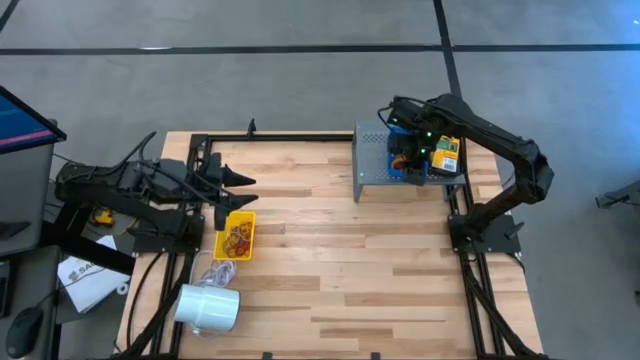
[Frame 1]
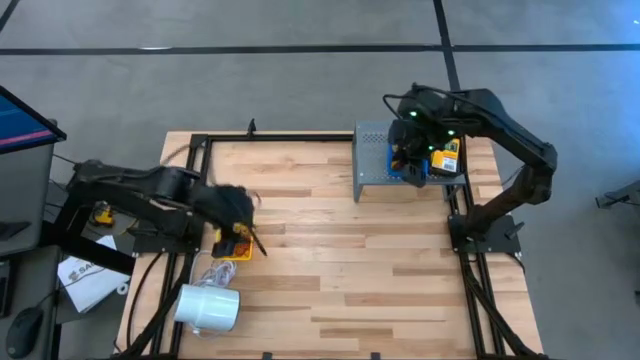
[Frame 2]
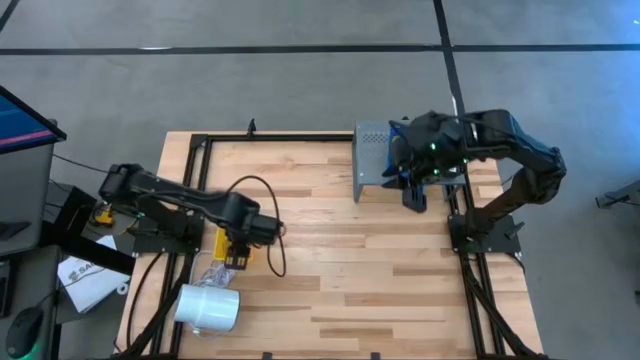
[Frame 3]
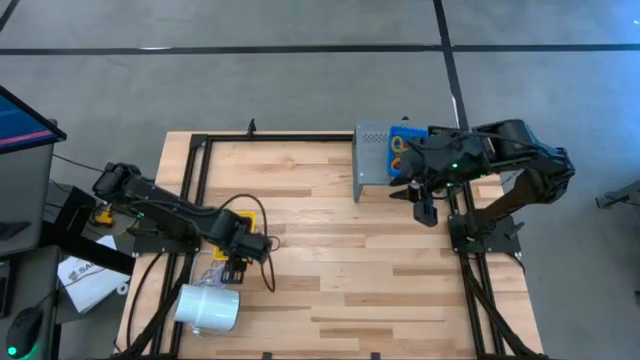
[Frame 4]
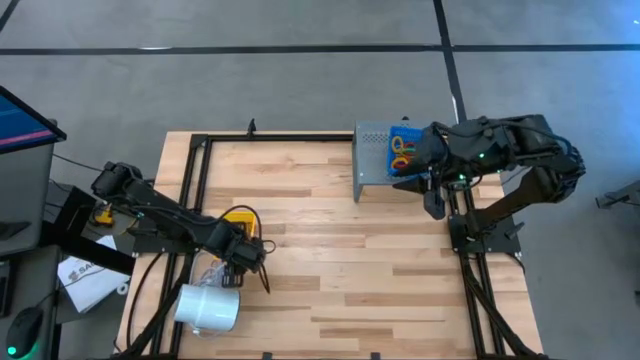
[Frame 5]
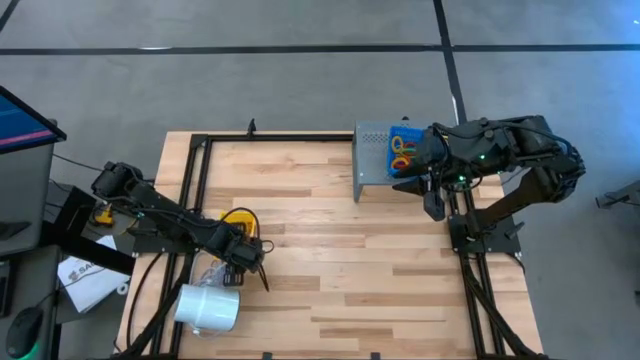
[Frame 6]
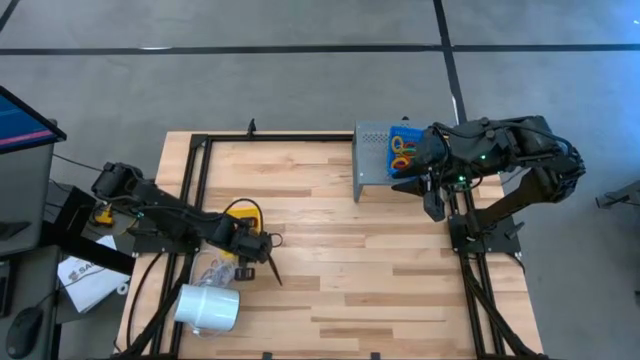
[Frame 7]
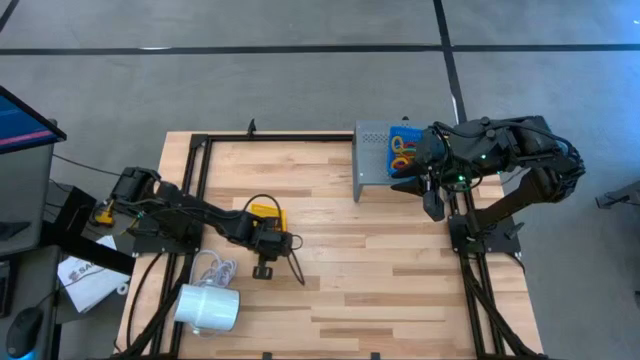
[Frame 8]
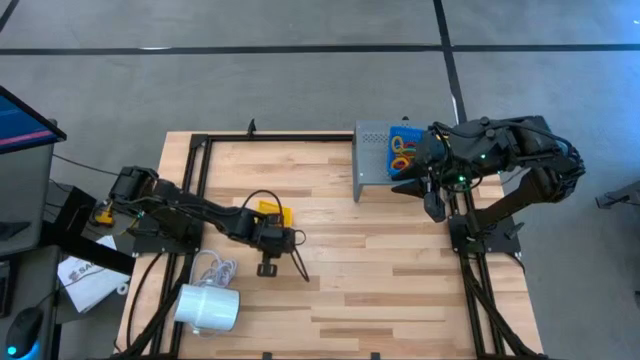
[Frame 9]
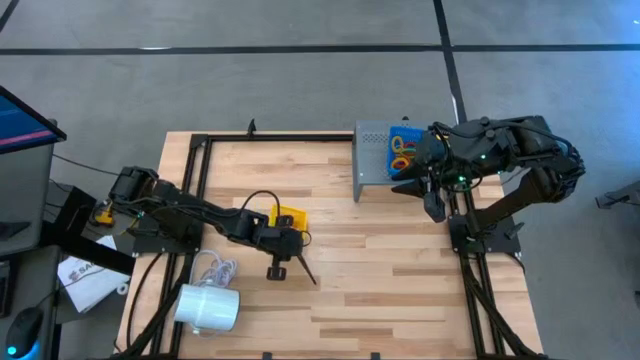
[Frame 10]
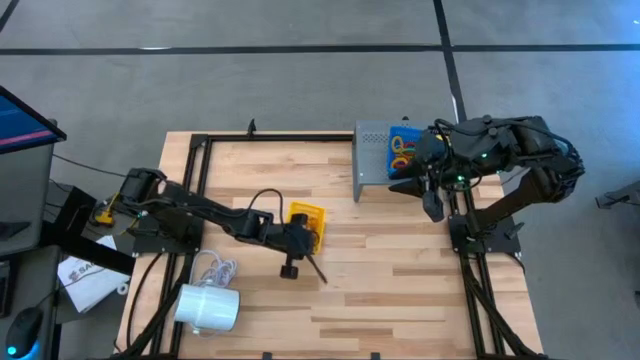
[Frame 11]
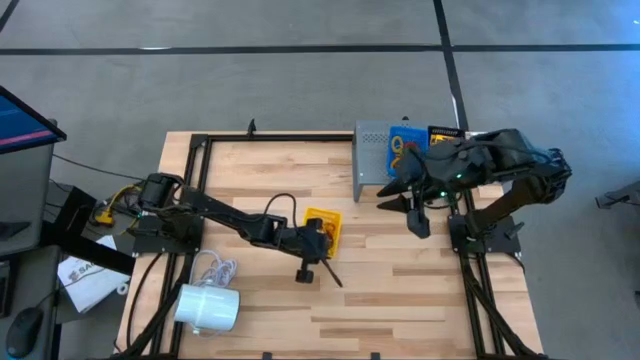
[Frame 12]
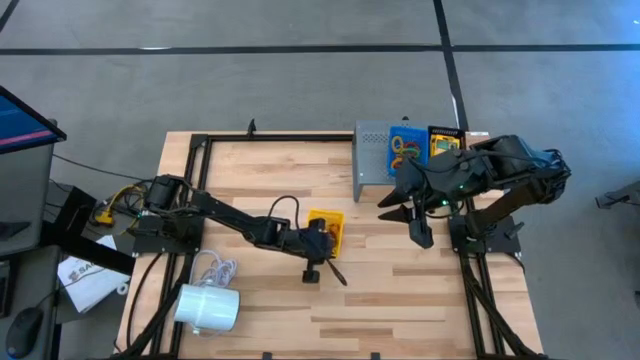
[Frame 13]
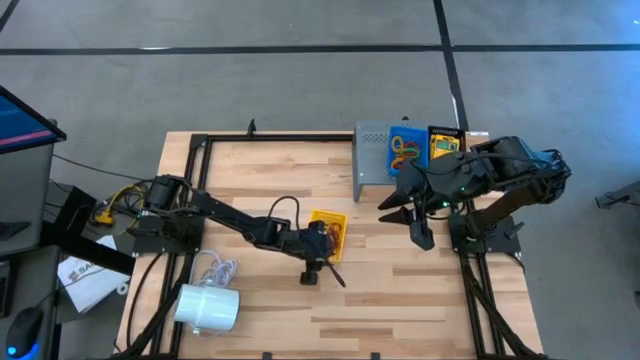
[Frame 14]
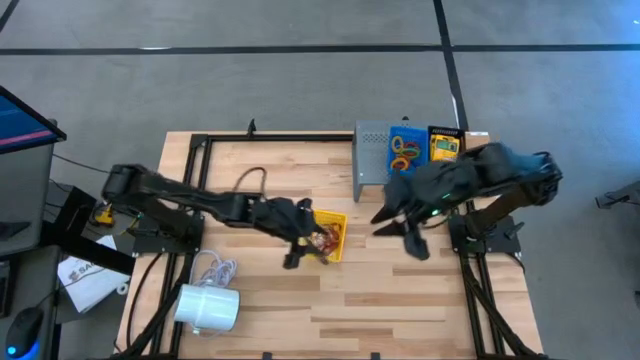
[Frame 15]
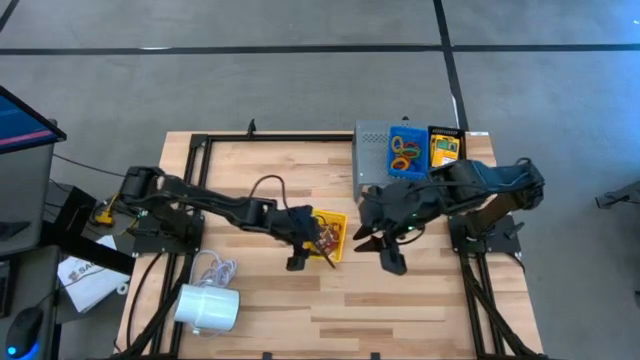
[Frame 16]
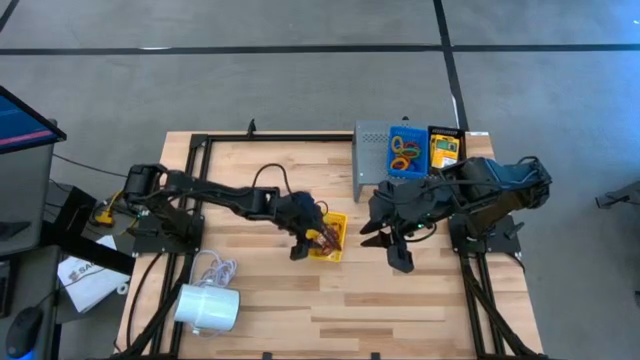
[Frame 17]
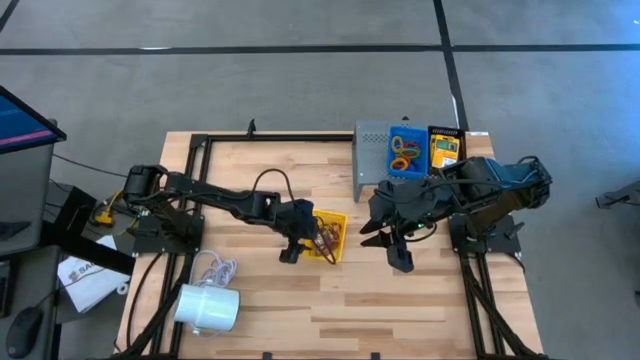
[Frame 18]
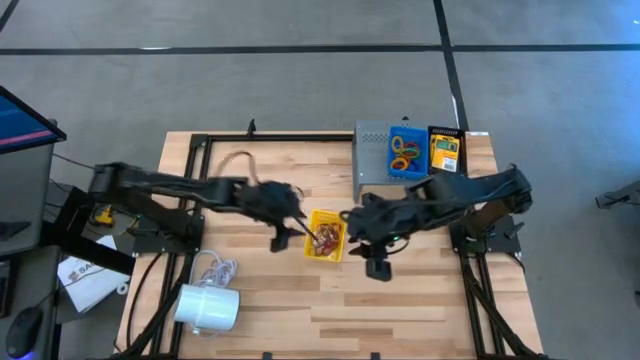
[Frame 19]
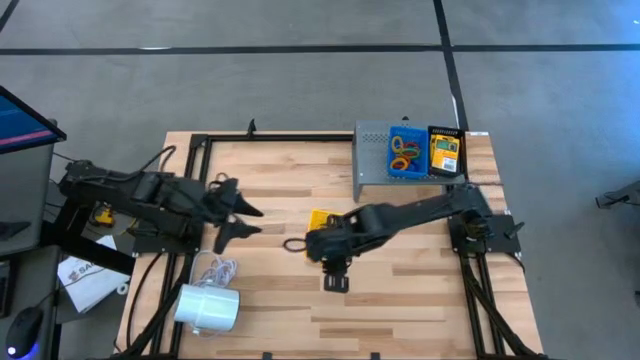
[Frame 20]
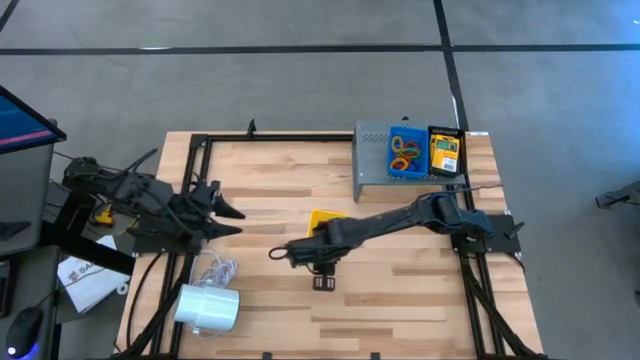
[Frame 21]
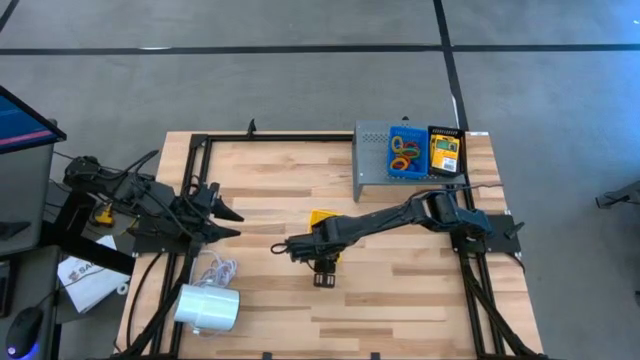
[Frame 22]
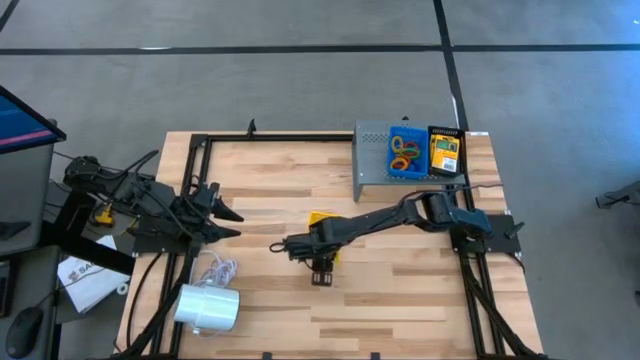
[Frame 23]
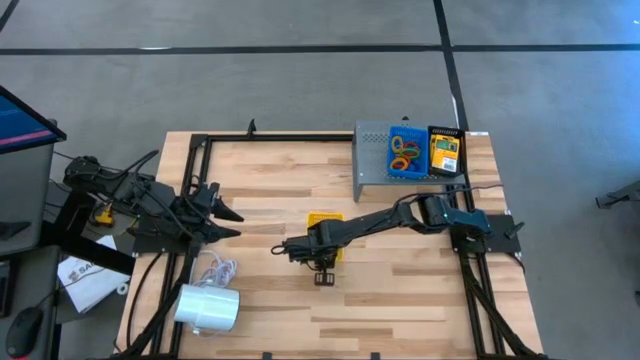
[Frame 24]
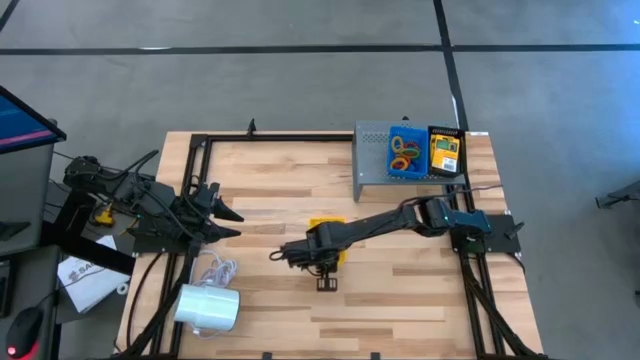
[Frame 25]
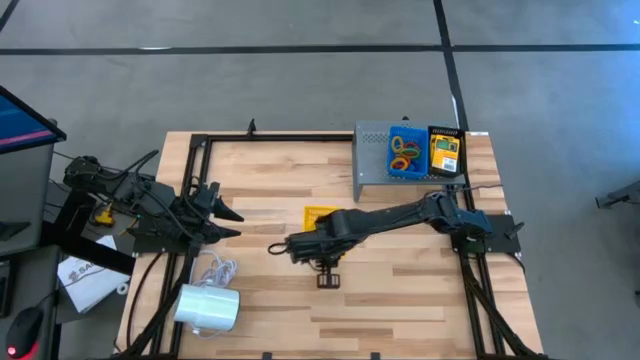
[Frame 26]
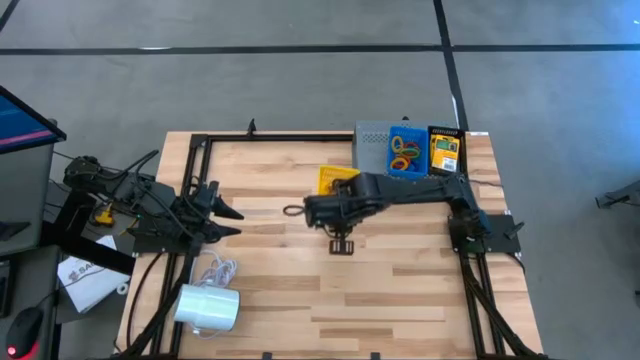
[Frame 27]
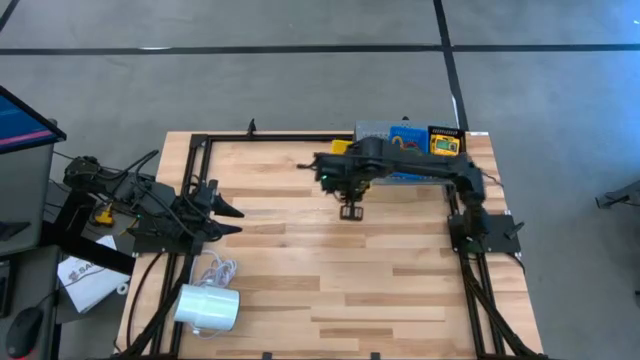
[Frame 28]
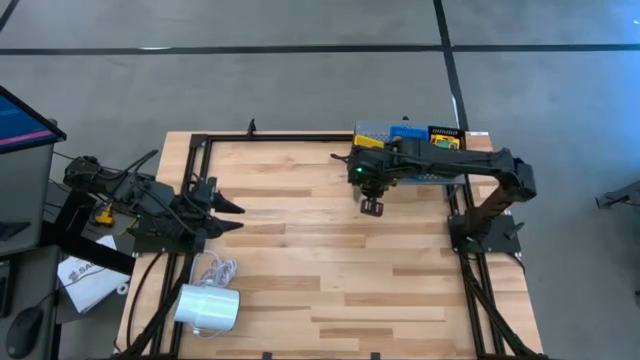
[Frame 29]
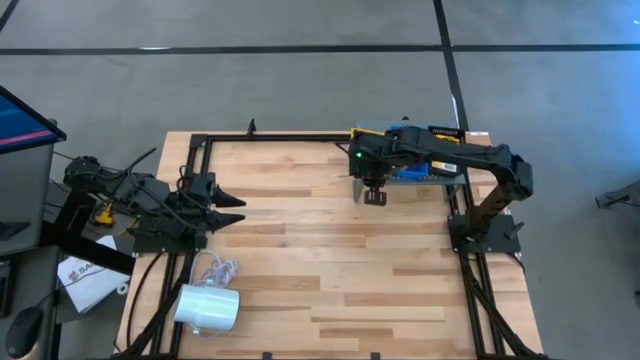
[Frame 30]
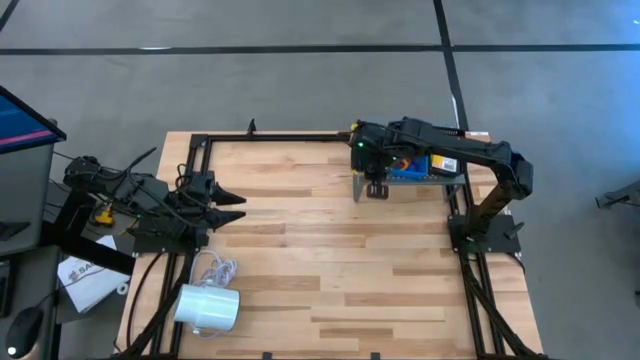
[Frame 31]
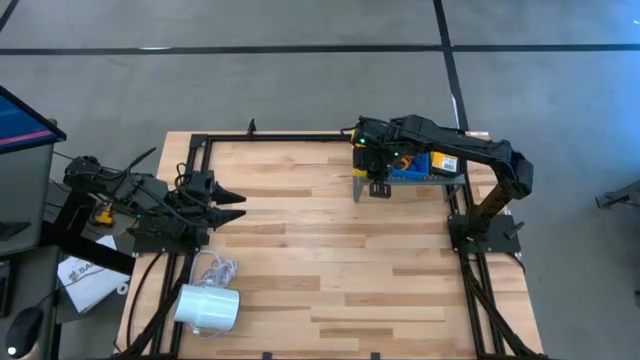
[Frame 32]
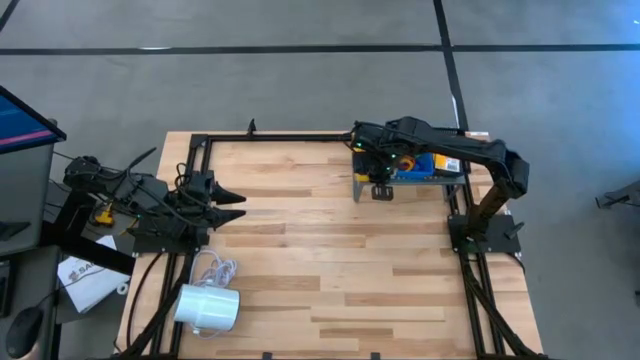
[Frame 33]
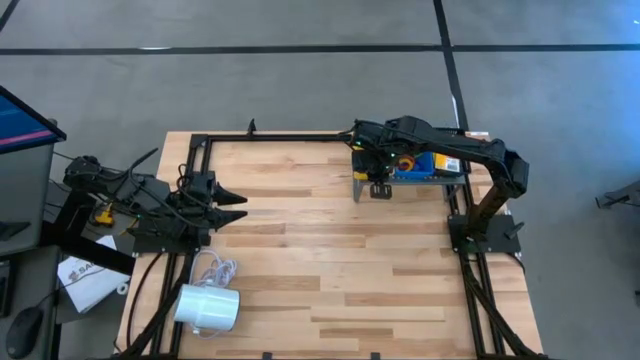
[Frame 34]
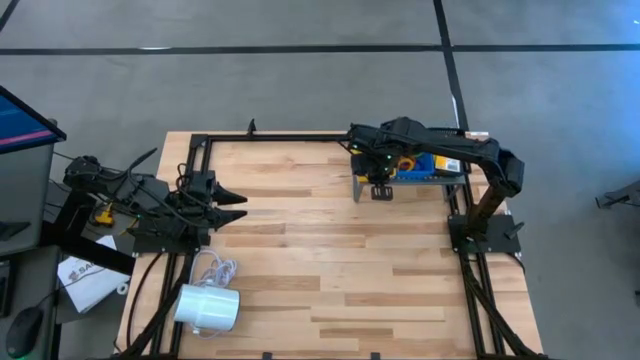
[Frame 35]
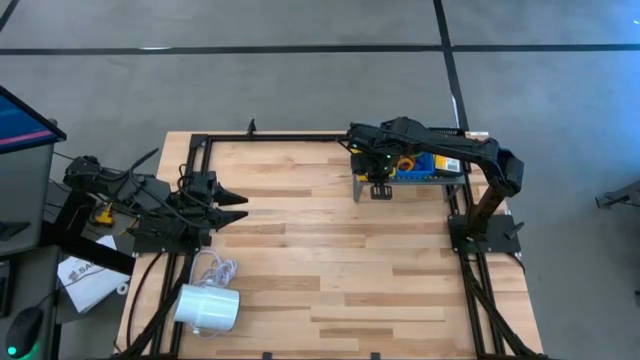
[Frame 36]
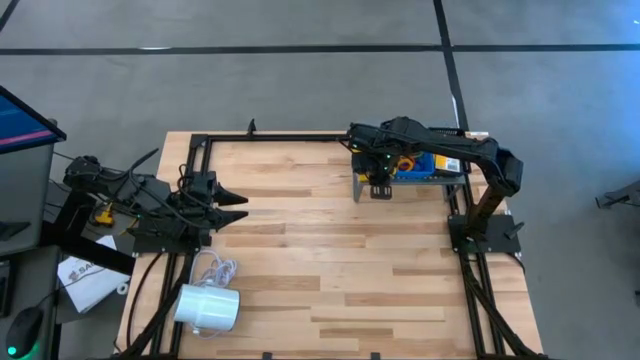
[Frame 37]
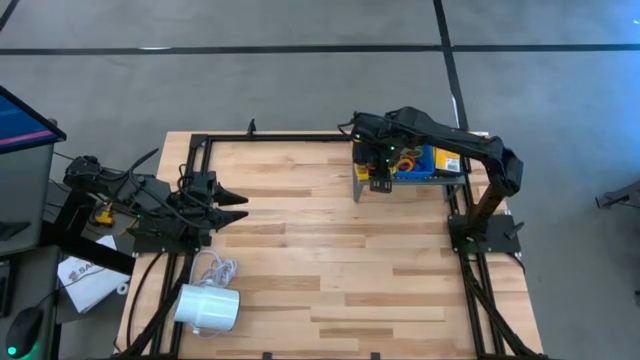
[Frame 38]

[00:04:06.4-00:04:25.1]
Task: Pick & Place Office Desk Supplies
Put the yellow bin with the colored rubber band on the shelf

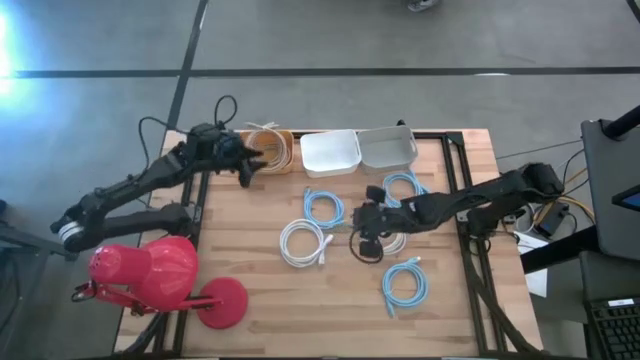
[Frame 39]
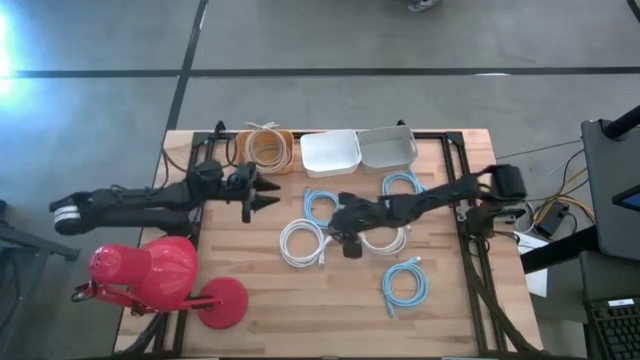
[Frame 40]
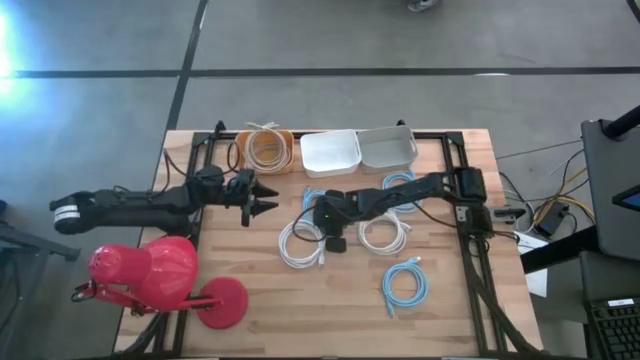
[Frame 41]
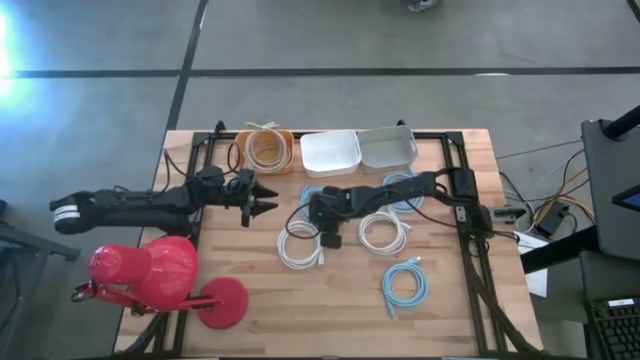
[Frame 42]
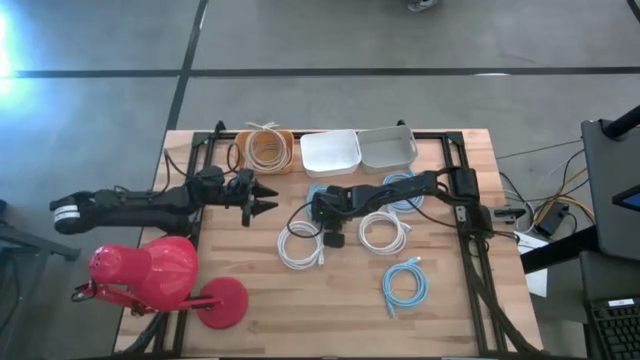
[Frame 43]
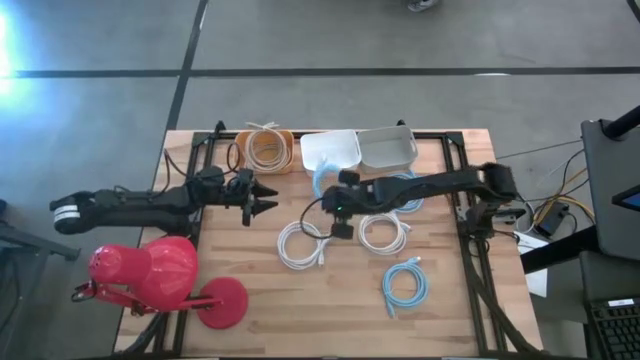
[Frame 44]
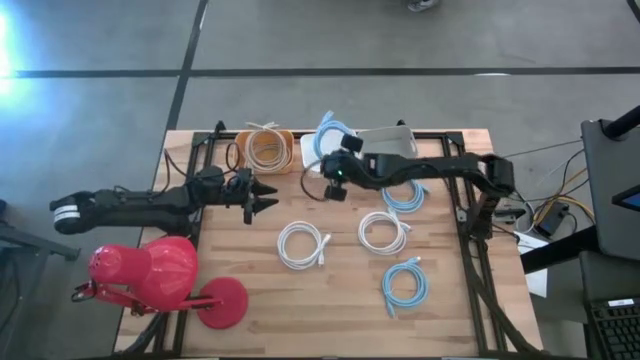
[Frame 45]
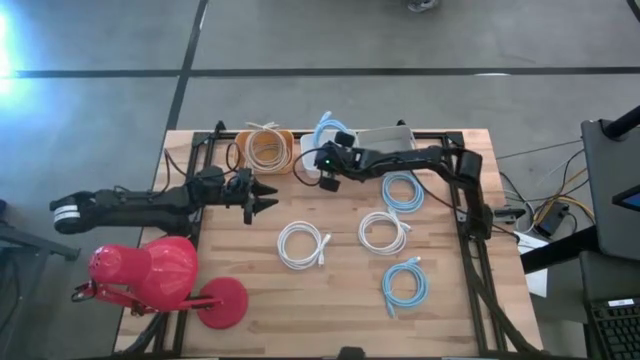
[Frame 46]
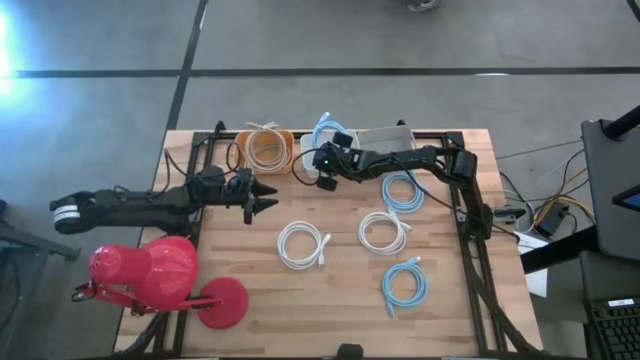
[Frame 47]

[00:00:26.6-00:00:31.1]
Task: Sort HDMI cables
Put the blue hdmi cable into the white bin
